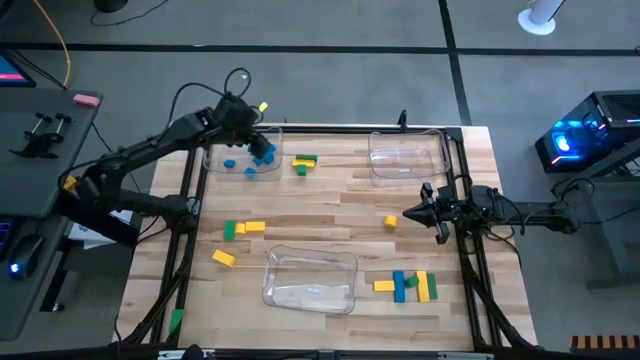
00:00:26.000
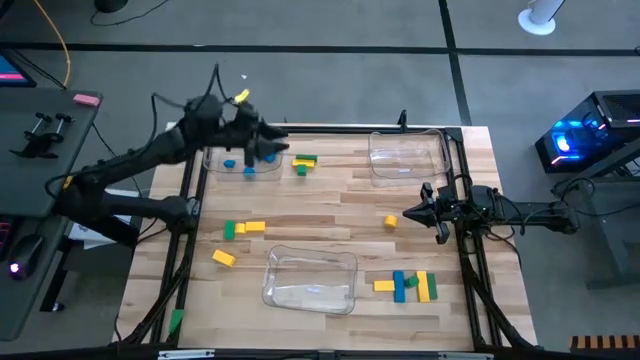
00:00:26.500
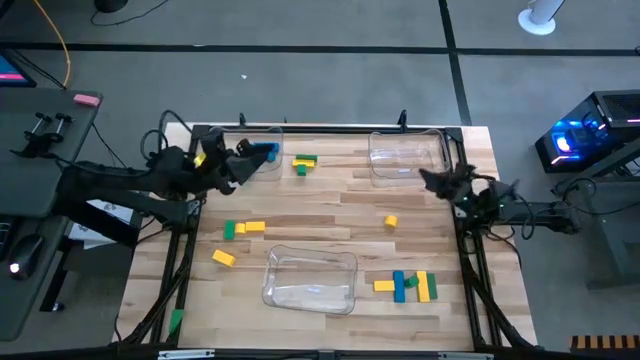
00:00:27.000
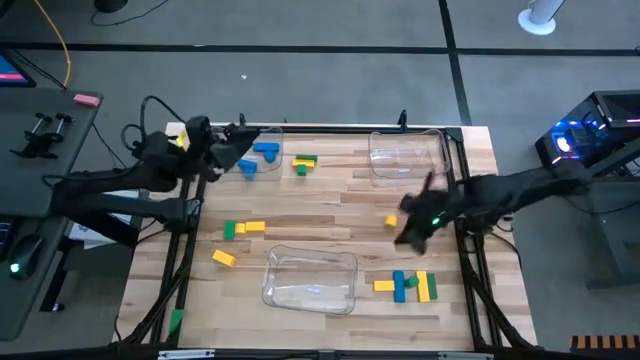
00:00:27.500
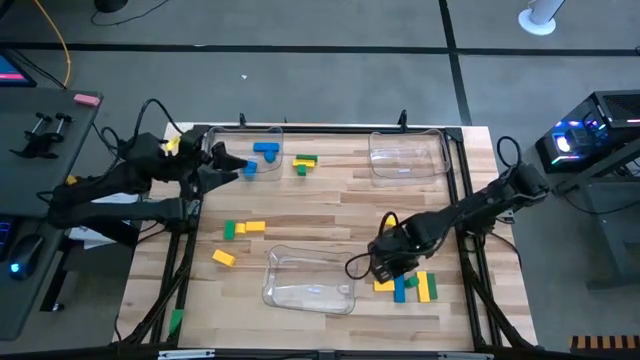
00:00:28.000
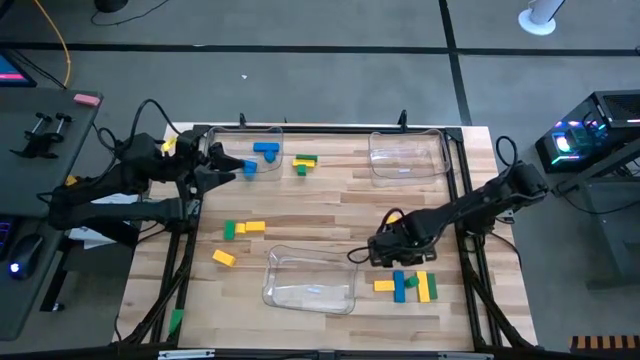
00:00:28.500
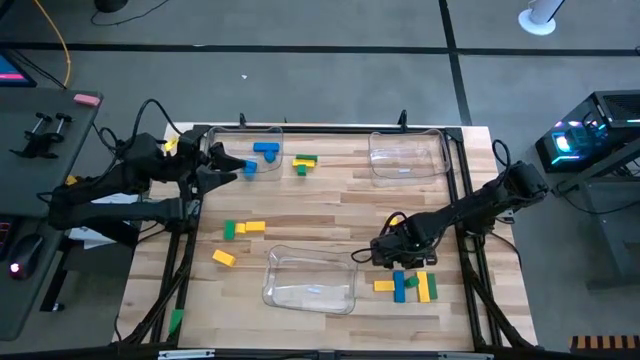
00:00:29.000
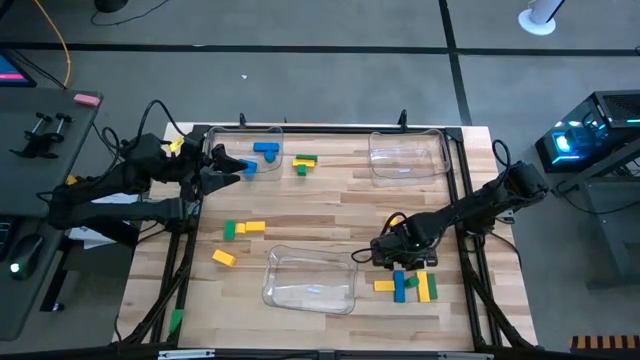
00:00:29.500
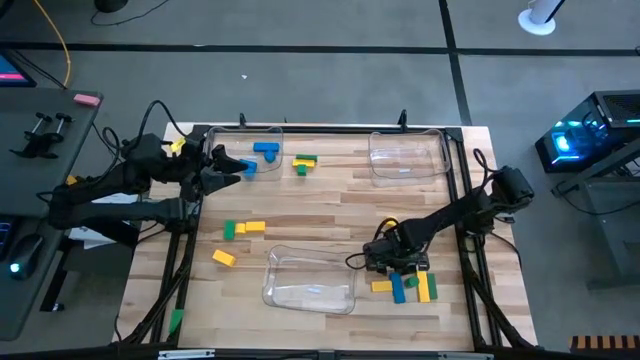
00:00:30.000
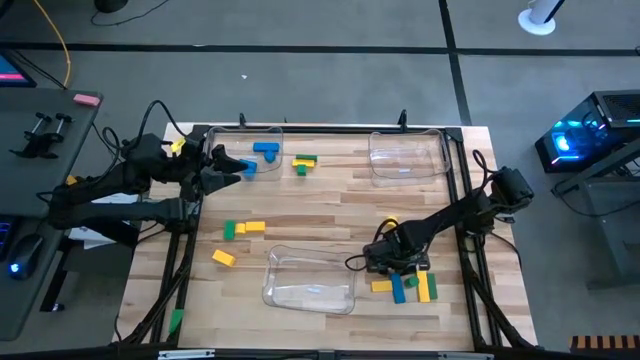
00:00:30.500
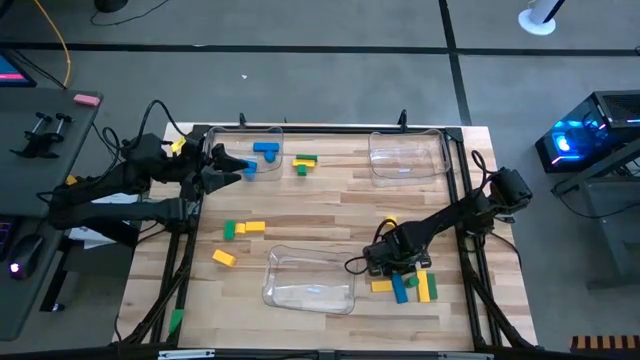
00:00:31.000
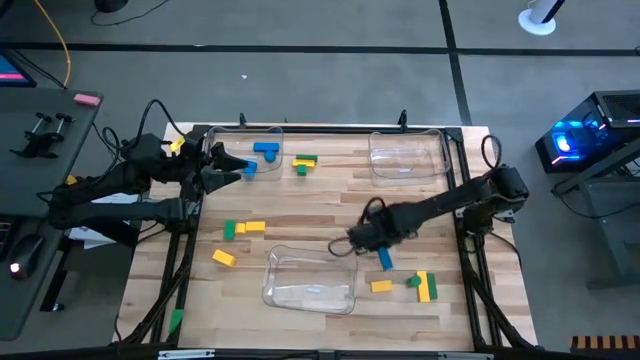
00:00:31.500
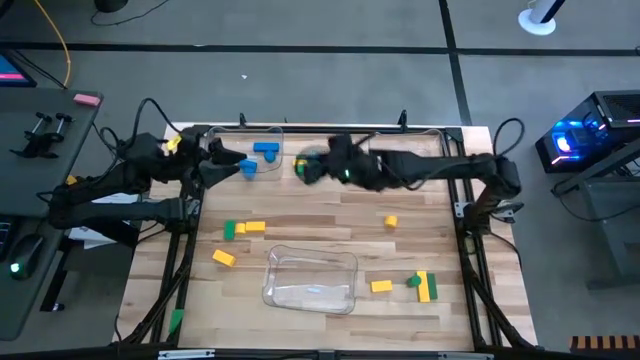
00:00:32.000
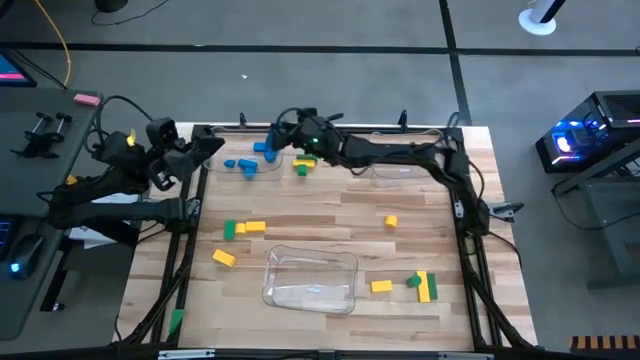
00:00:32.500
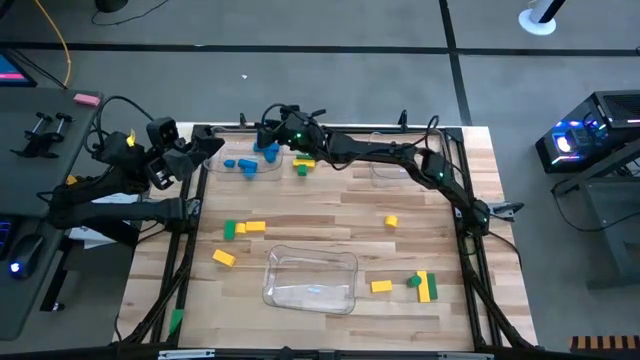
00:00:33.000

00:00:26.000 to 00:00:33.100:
Task: Sort blocks
Put the blue block into the left transparent bin

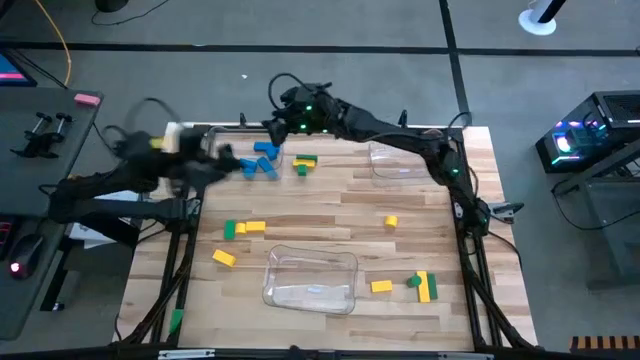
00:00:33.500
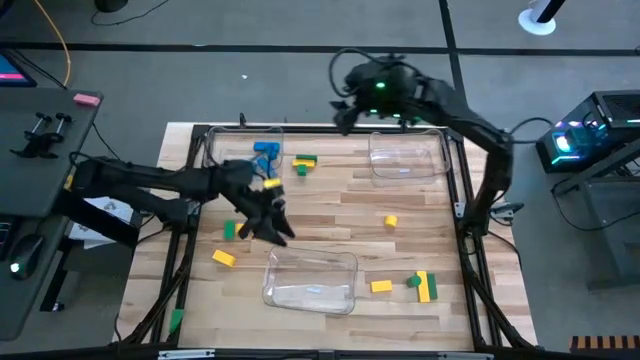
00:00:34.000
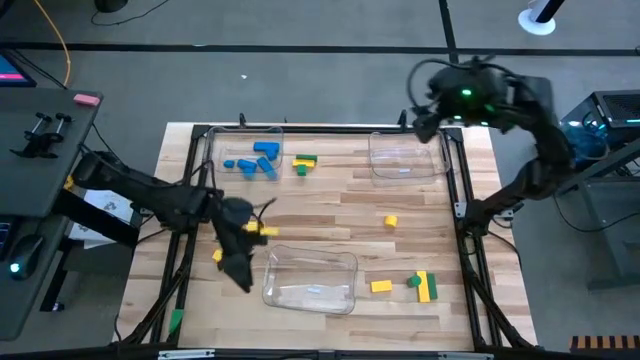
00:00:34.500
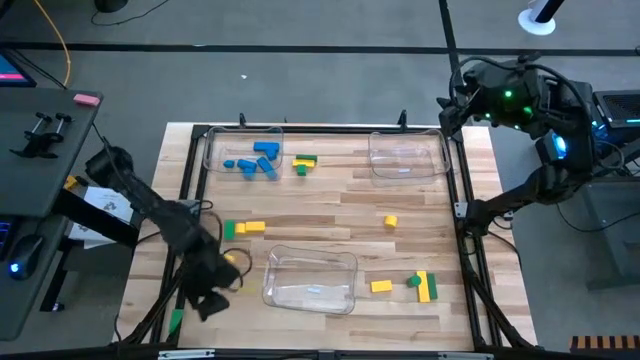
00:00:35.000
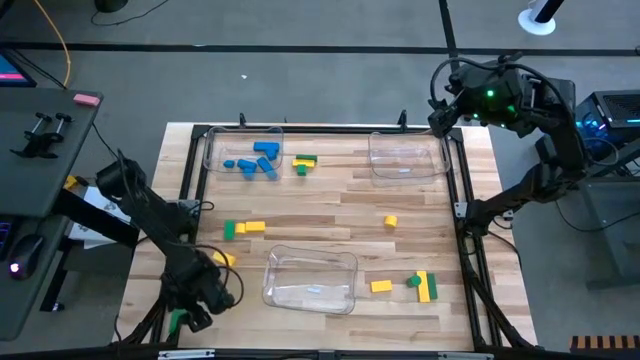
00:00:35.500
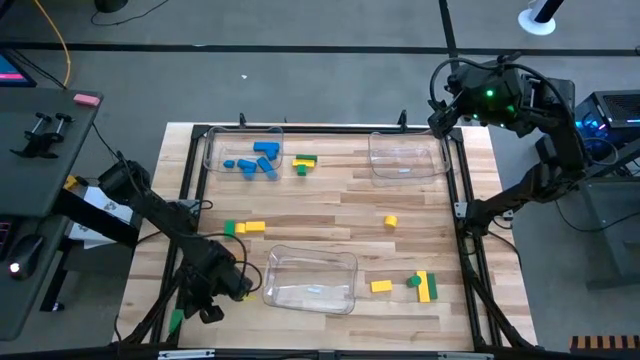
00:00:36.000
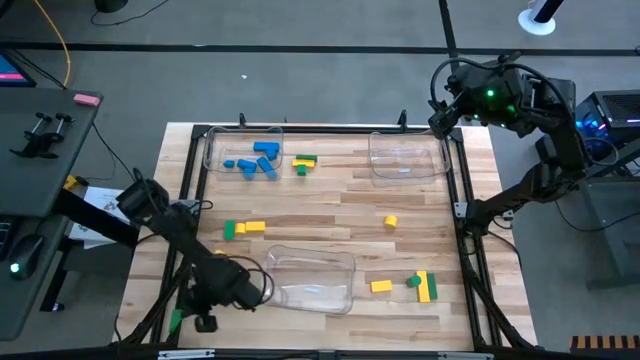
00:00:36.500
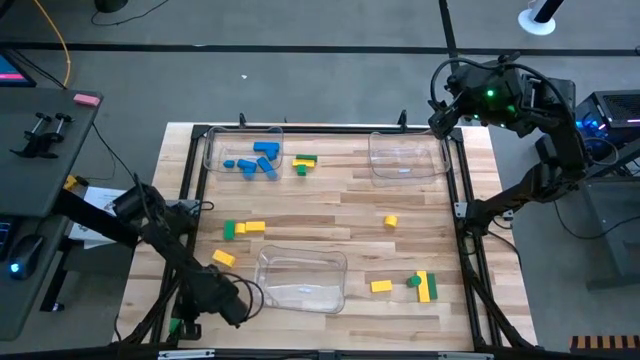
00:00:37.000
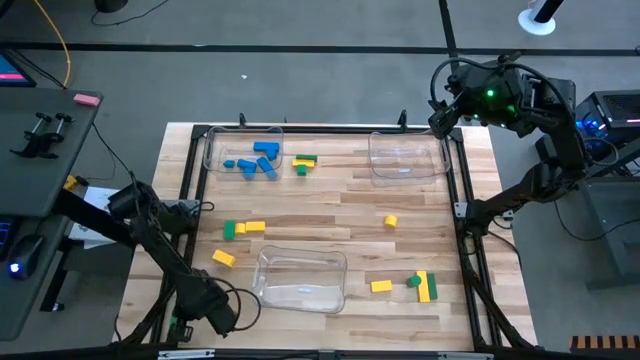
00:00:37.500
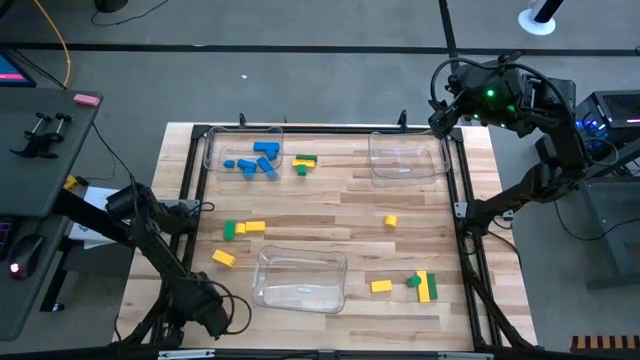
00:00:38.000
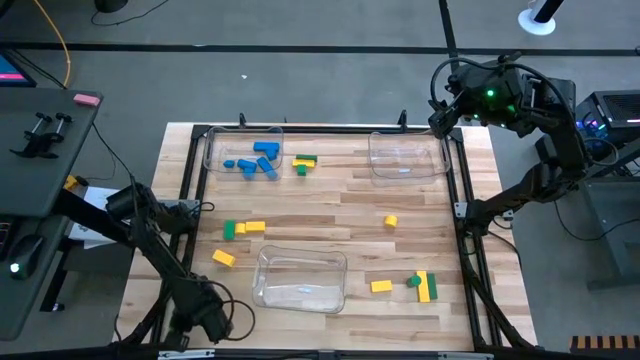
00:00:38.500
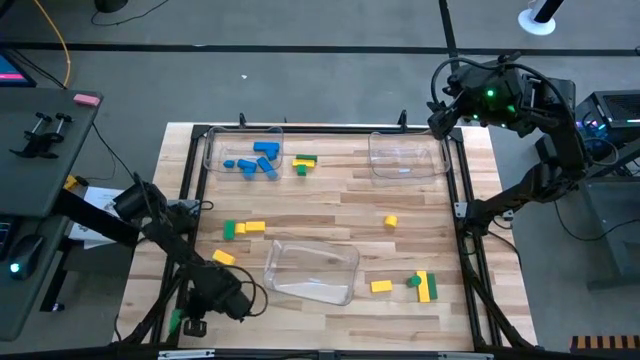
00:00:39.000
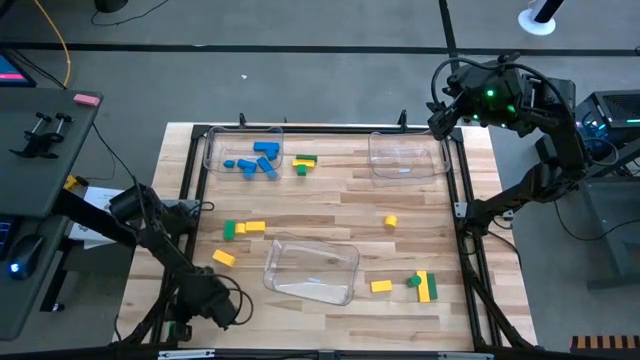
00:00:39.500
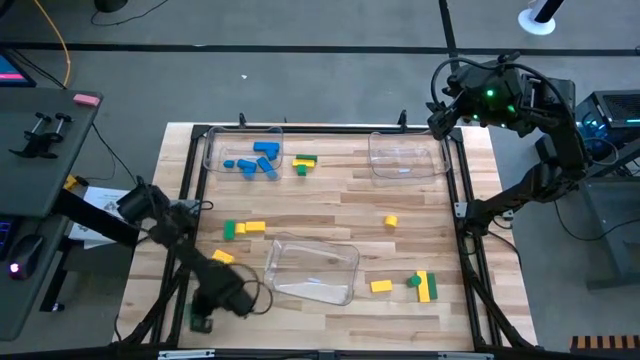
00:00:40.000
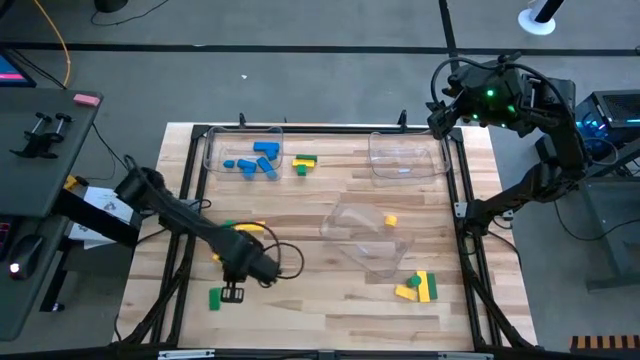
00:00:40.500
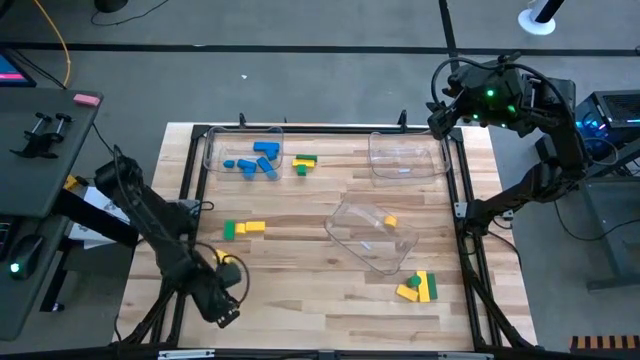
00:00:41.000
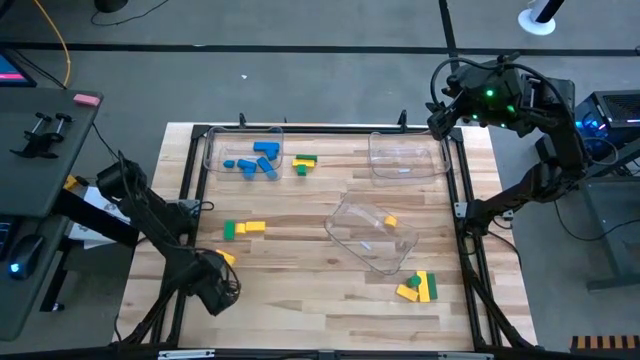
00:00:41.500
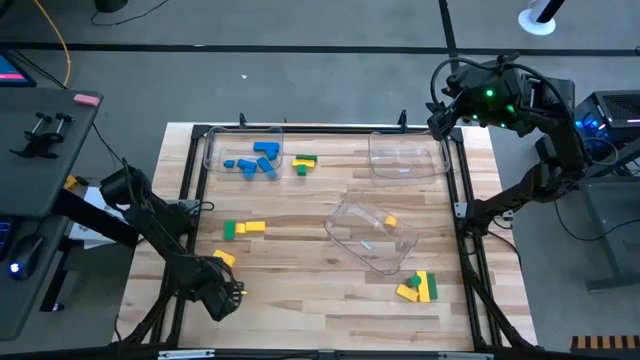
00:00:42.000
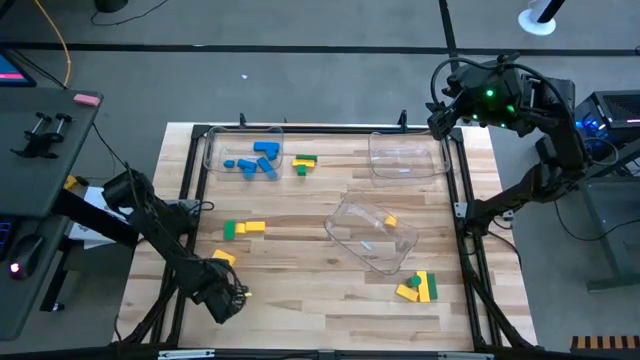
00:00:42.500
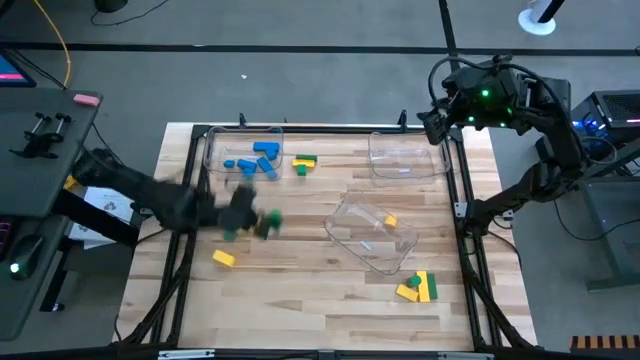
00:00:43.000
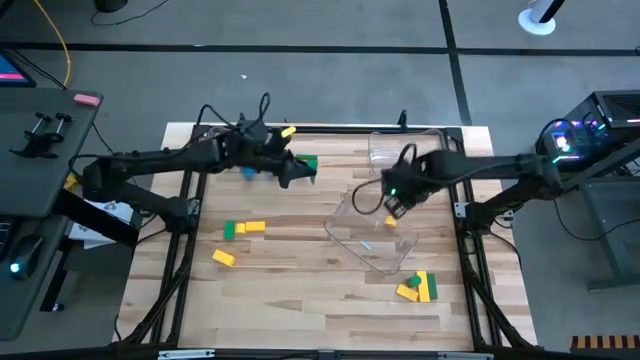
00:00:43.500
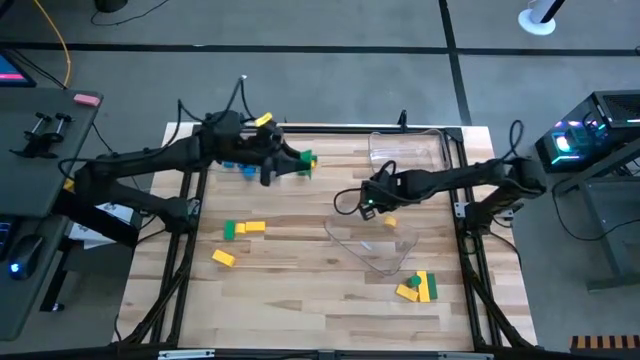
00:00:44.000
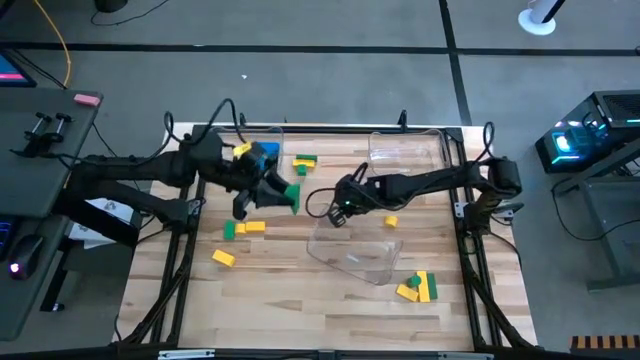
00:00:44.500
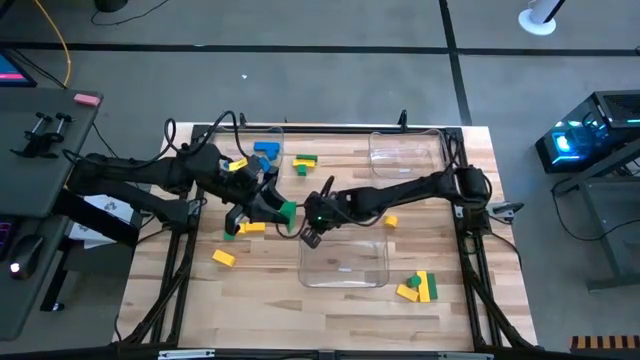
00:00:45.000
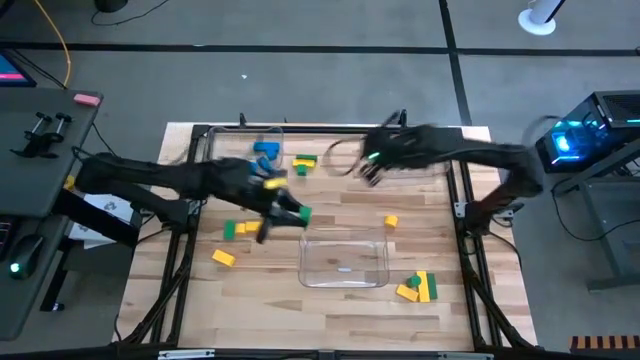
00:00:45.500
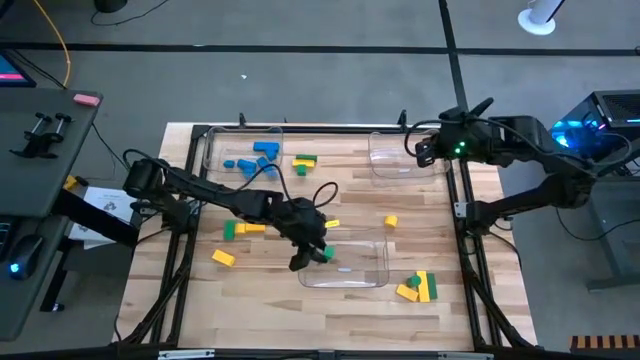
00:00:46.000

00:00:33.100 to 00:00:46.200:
Put the green block into the bottom transparent bin

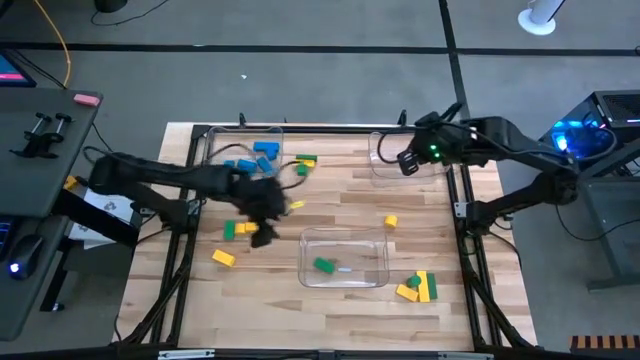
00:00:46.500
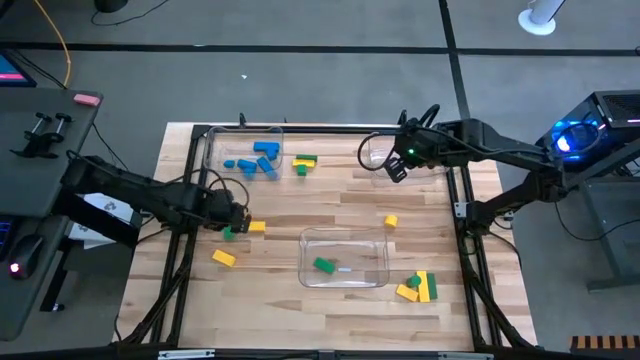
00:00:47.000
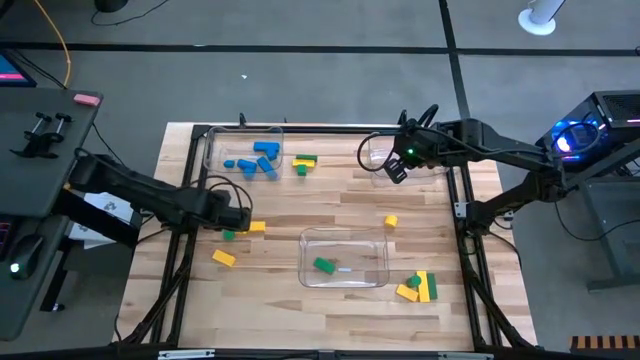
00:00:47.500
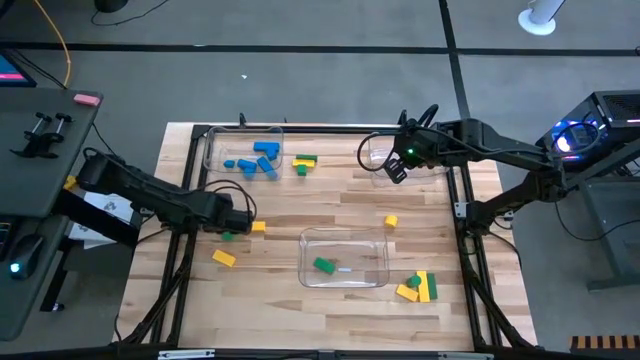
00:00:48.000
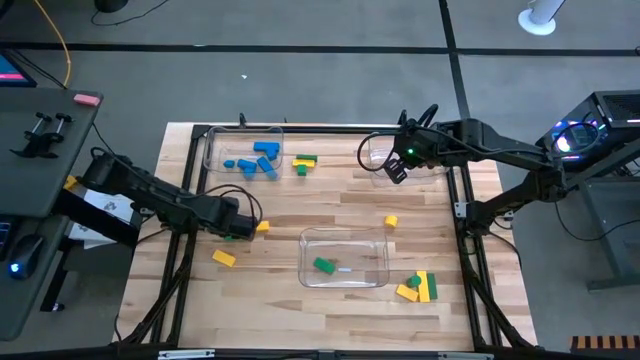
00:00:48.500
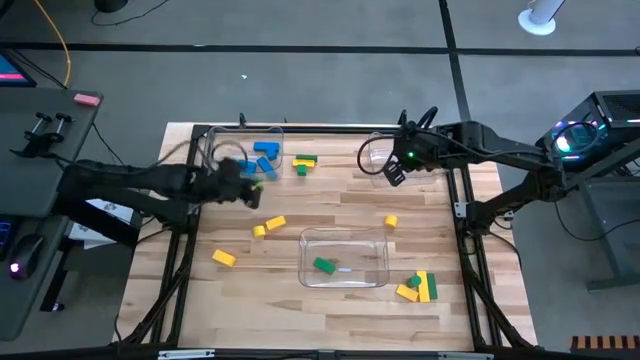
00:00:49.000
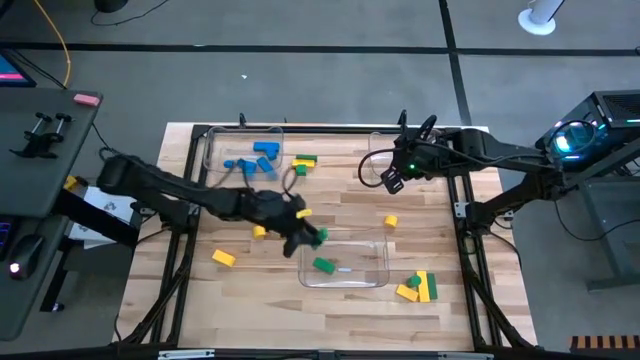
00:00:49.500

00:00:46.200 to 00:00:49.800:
Put the green block into the bottom transparent bin
